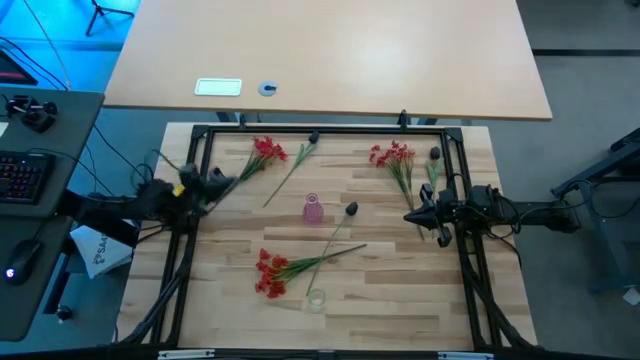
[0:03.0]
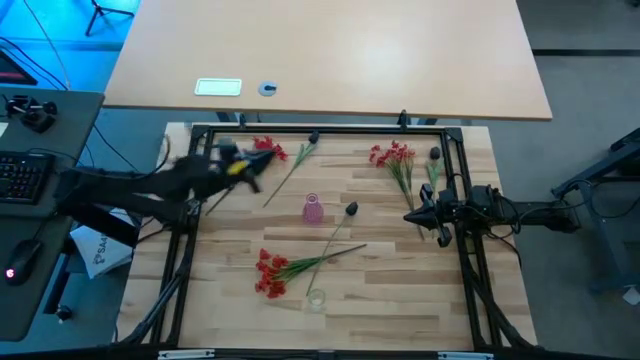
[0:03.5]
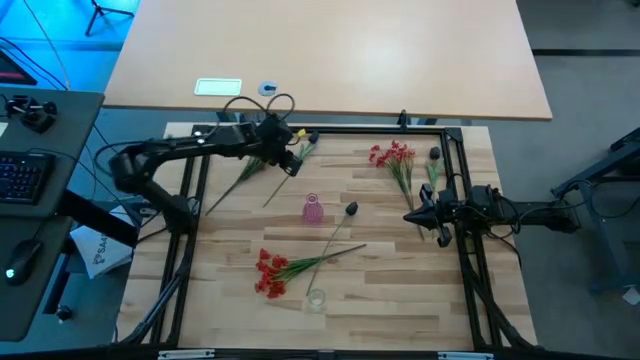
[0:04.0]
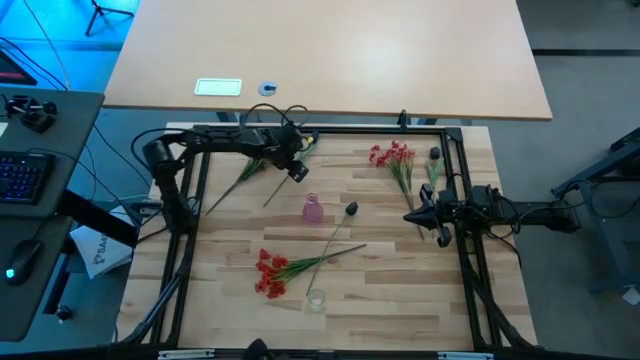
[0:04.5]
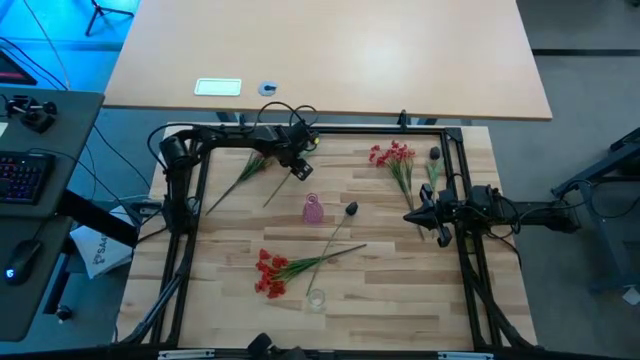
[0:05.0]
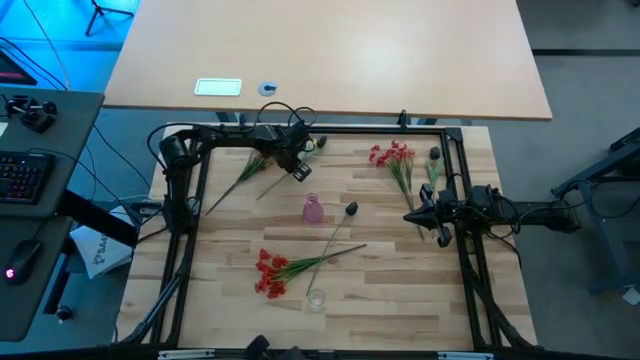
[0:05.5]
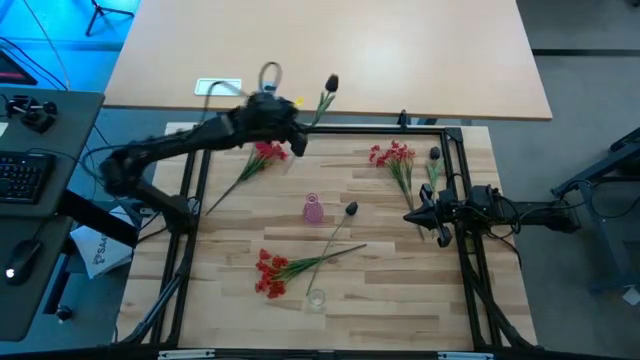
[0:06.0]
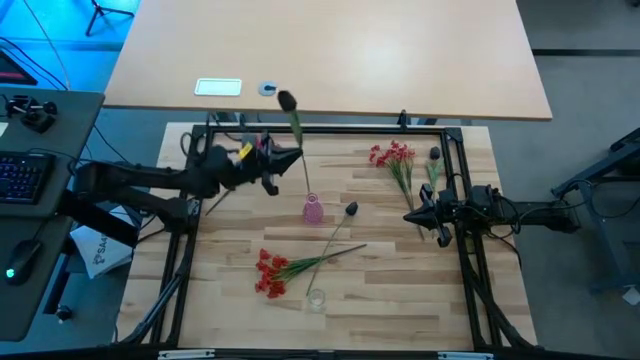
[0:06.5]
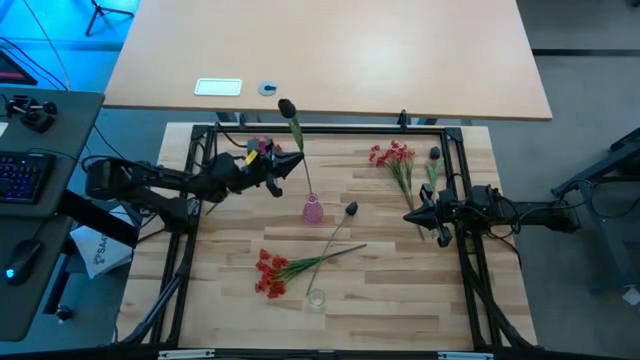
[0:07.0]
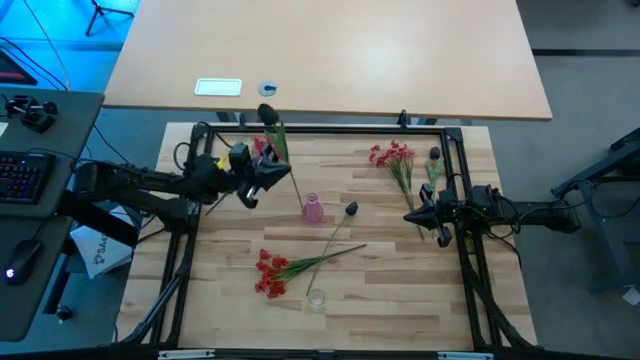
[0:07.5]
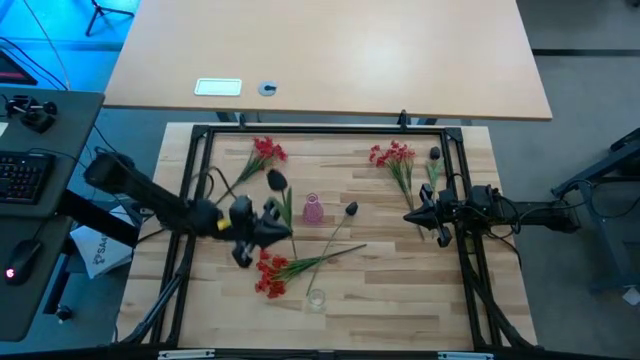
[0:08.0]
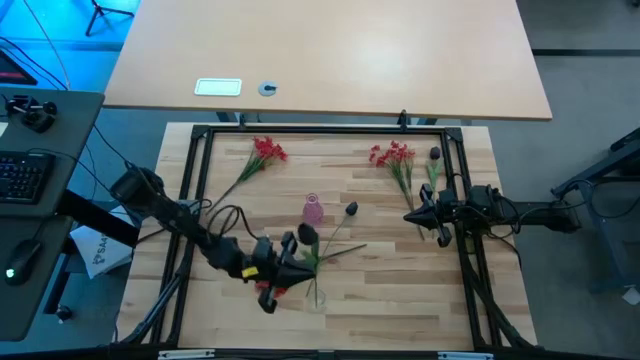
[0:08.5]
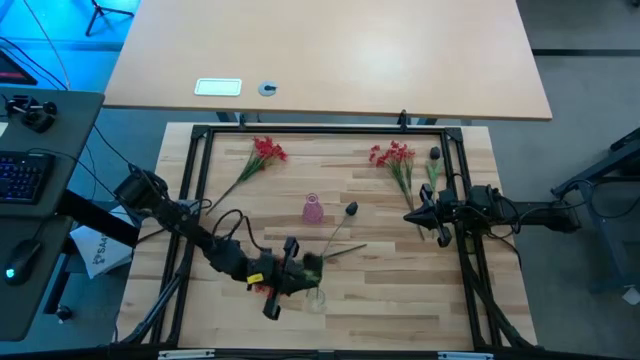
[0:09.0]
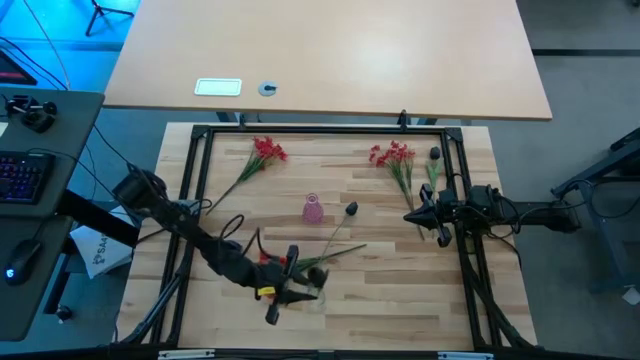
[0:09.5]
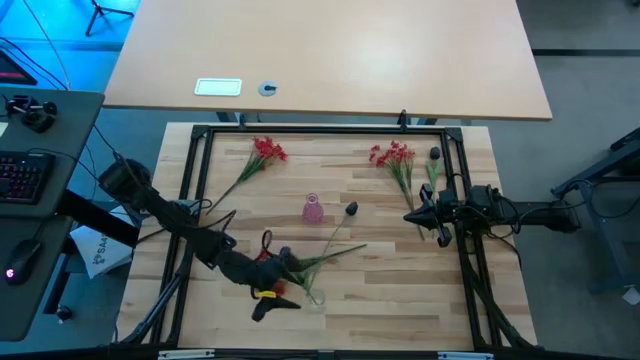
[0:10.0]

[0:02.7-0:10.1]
Task: Sort flowers into vase by color
Put the top left black flower into the transparent vase

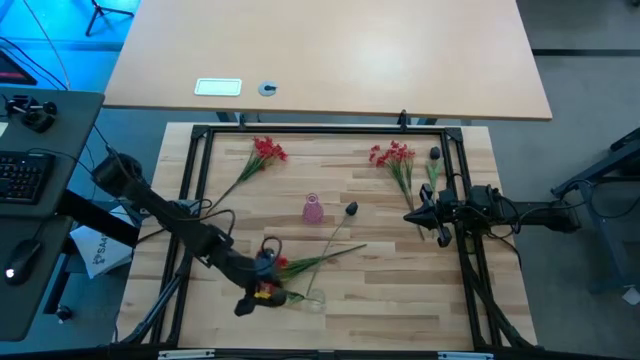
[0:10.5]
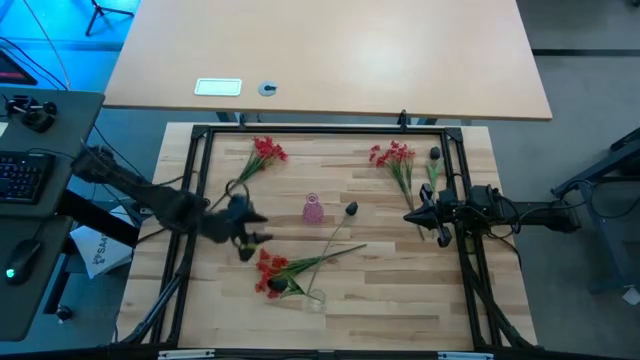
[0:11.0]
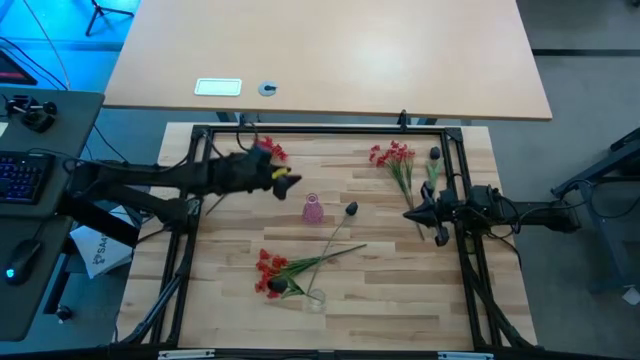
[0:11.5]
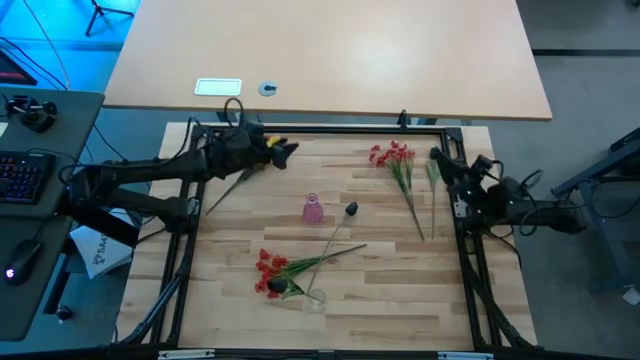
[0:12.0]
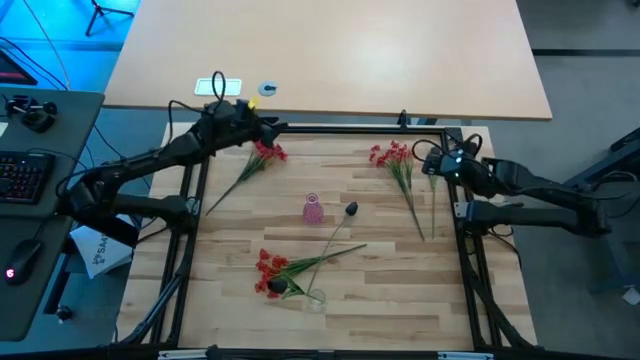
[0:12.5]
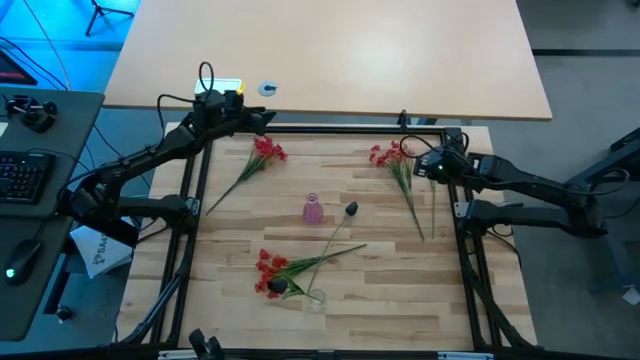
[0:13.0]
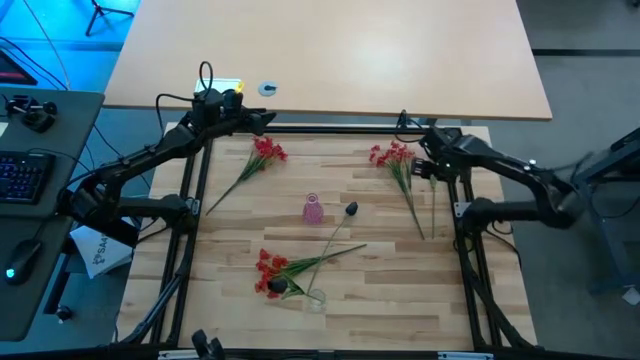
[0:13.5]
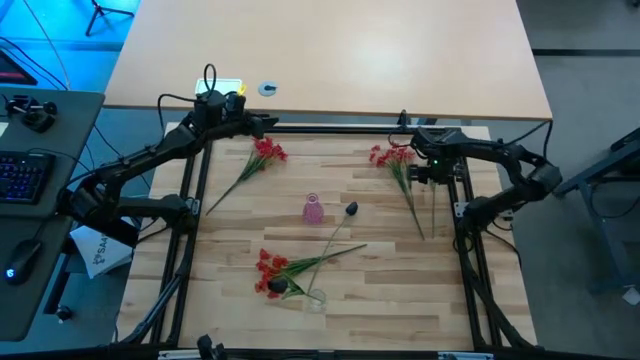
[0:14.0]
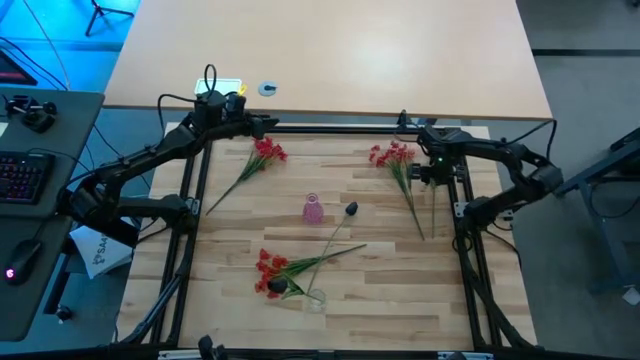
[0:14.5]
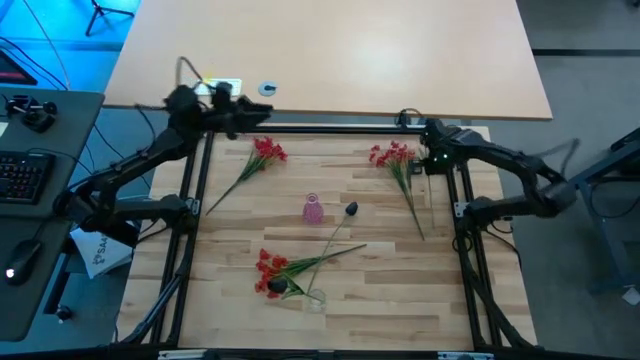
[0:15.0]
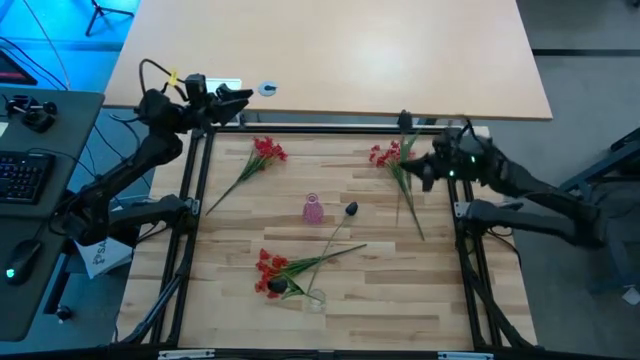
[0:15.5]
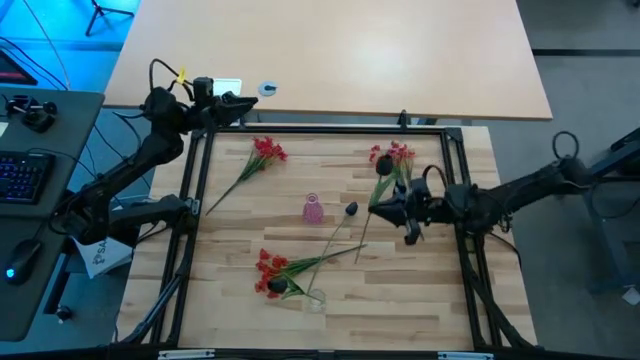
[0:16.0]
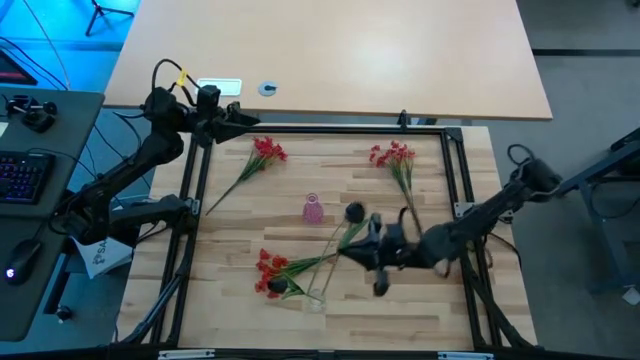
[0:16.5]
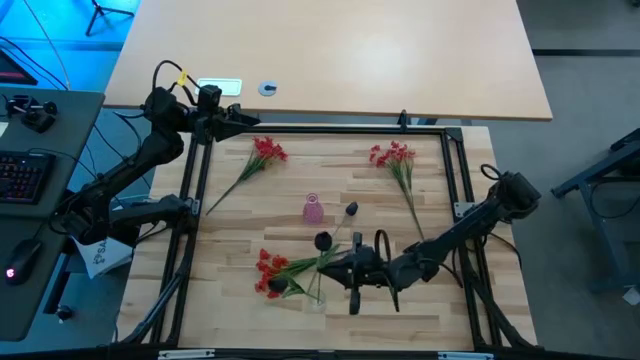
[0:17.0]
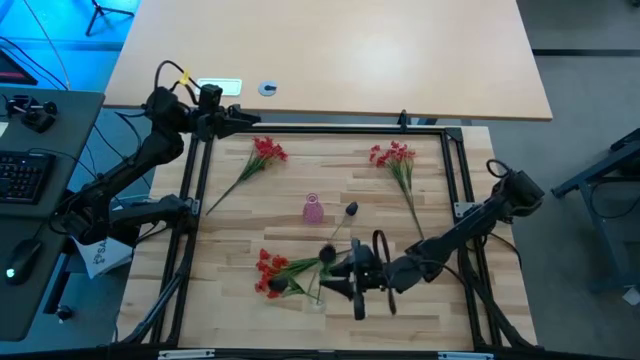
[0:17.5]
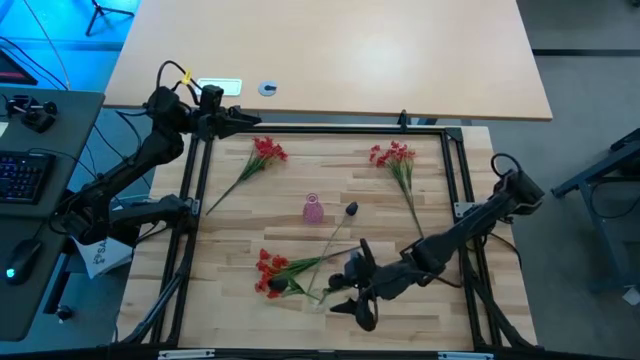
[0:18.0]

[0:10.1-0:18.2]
Put the top black flower into the transparent vase

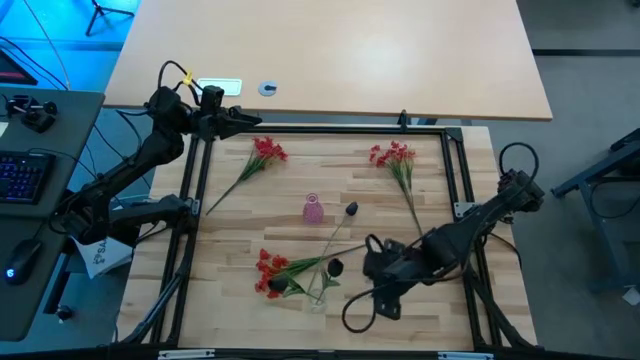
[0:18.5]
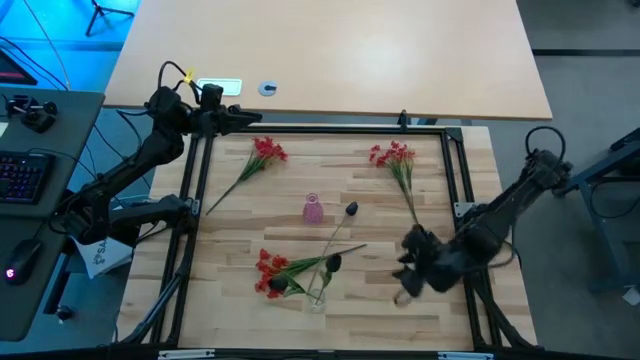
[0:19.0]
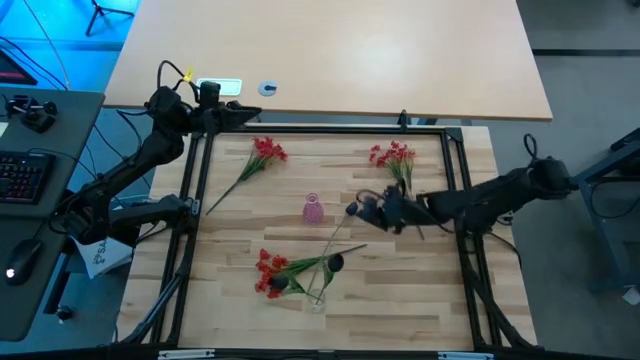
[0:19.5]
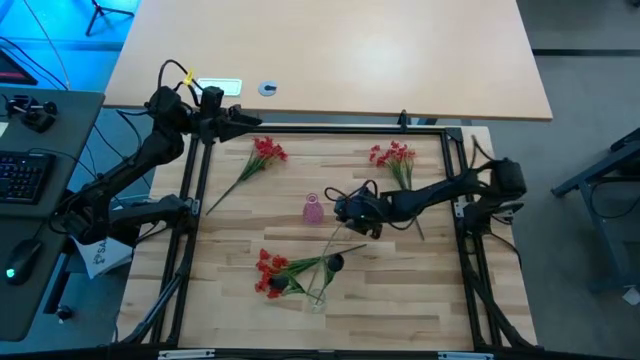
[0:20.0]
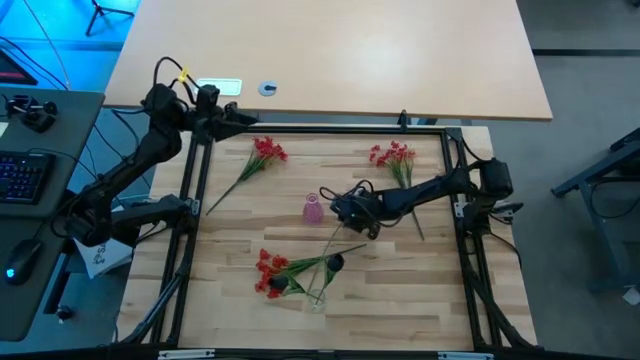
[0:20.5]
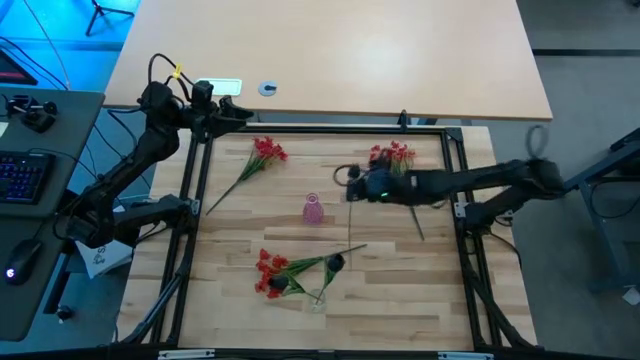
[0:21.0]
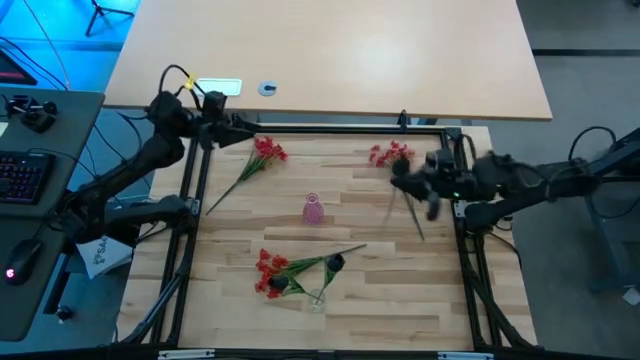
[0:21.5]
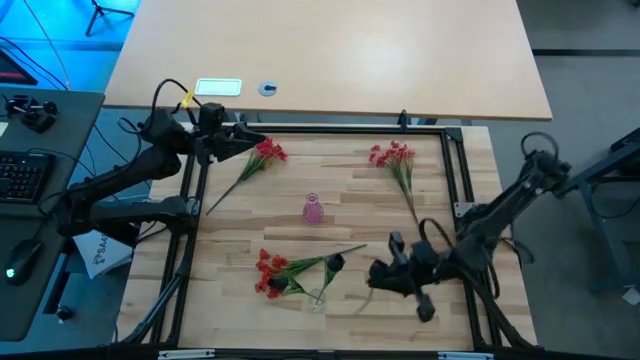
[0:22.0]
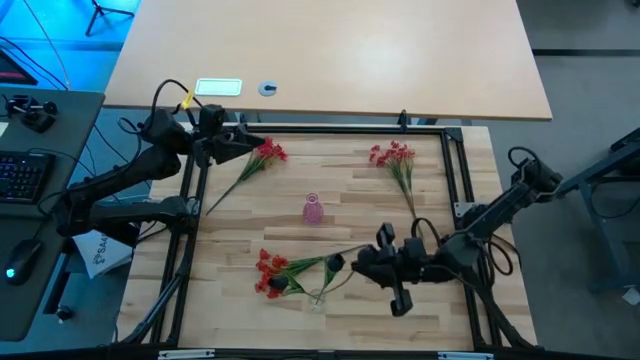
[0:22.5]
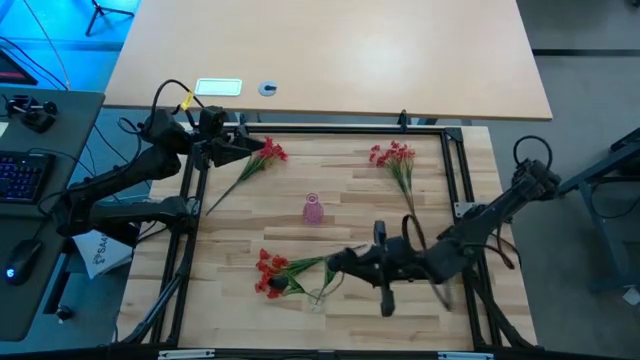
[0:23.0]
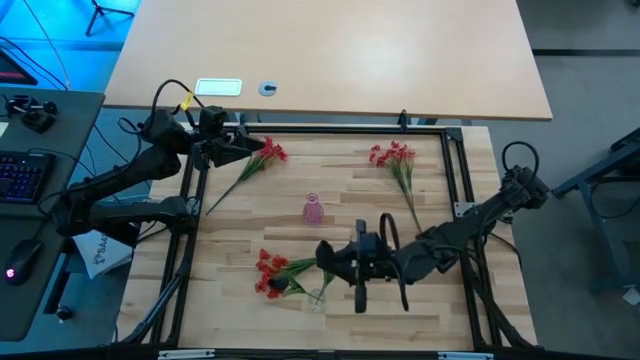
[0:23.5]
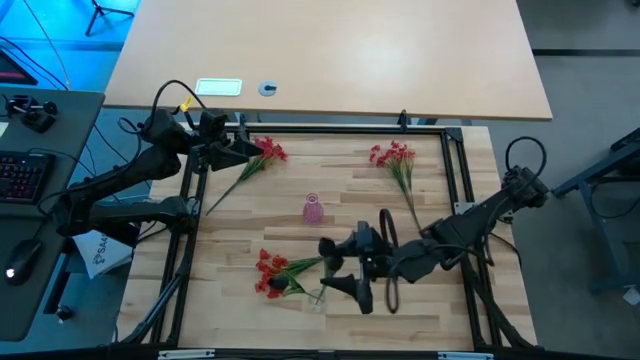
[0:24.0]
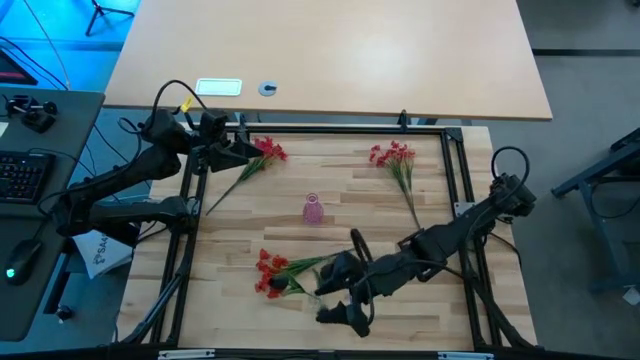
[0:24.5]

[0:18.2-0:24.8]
Put the black flower into the transparent vase
